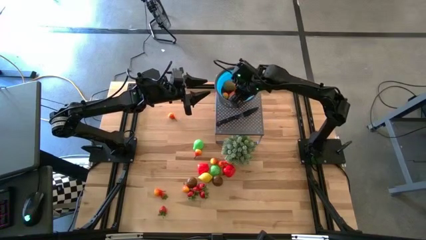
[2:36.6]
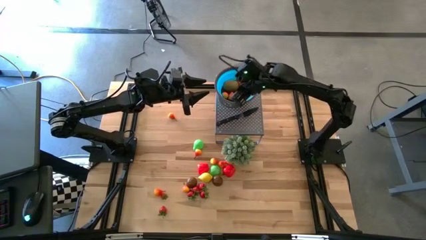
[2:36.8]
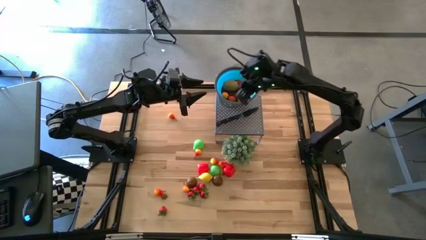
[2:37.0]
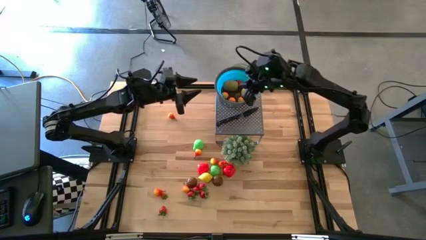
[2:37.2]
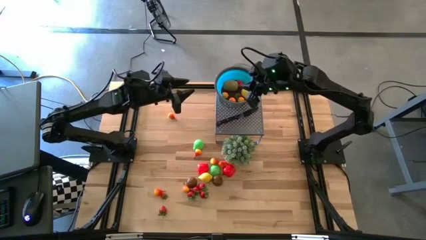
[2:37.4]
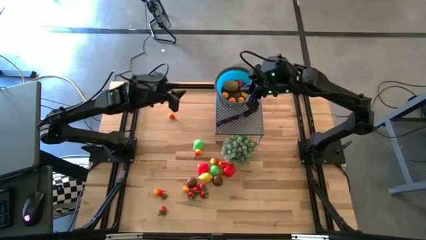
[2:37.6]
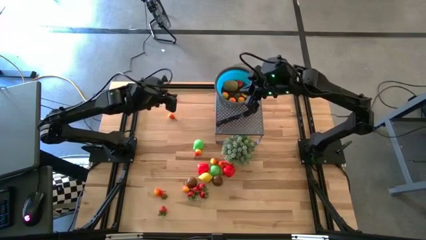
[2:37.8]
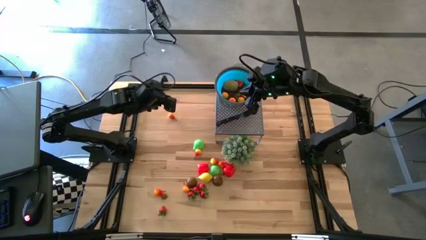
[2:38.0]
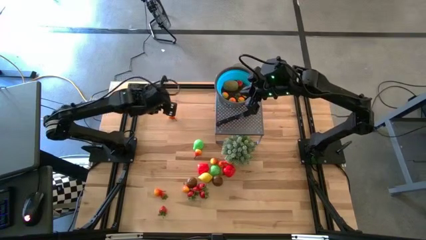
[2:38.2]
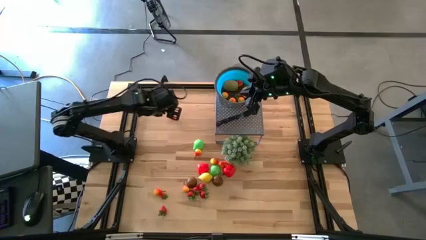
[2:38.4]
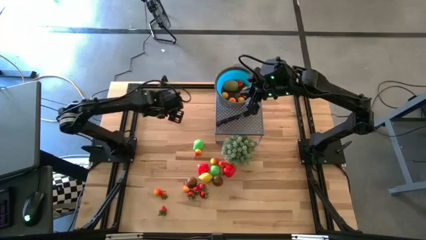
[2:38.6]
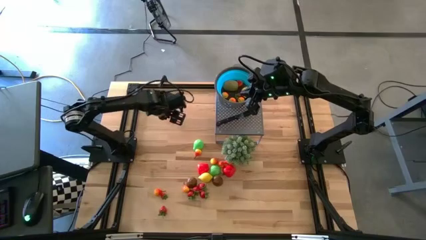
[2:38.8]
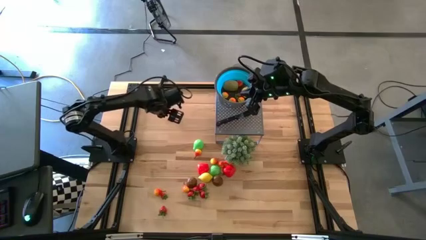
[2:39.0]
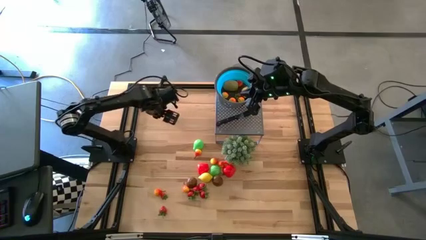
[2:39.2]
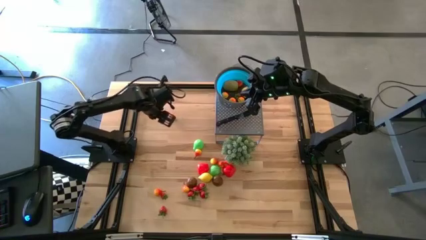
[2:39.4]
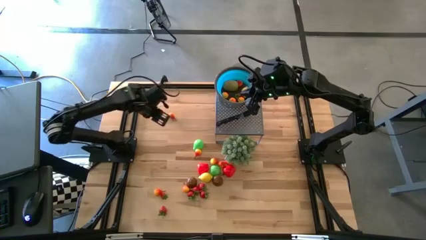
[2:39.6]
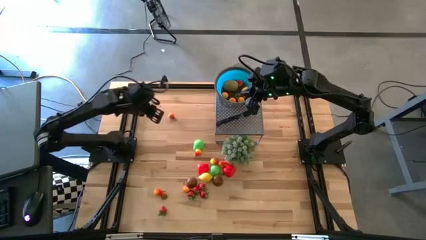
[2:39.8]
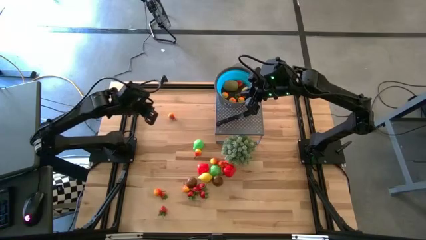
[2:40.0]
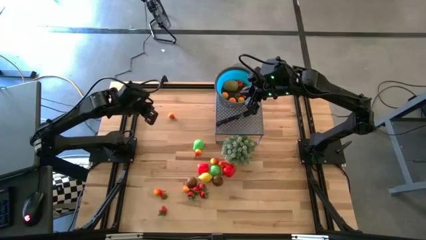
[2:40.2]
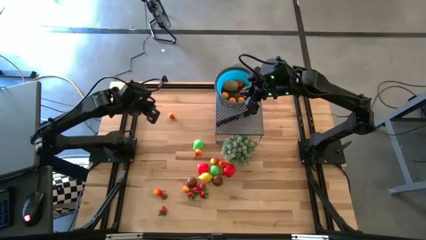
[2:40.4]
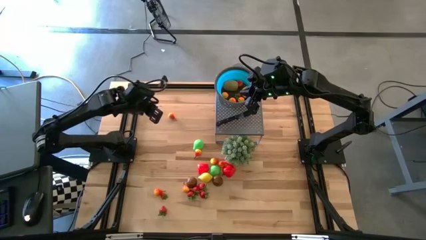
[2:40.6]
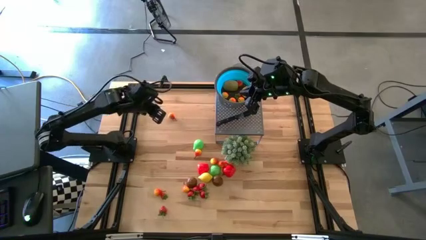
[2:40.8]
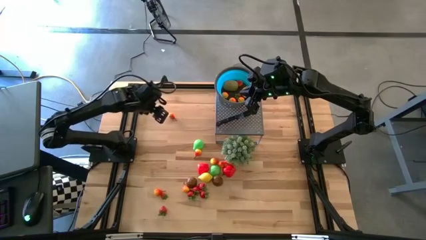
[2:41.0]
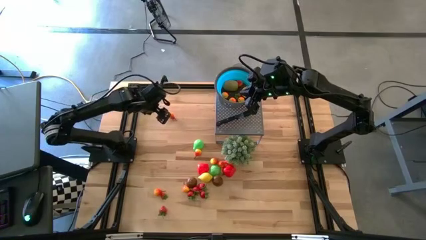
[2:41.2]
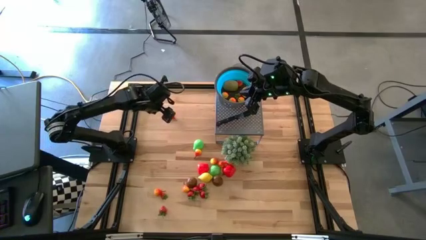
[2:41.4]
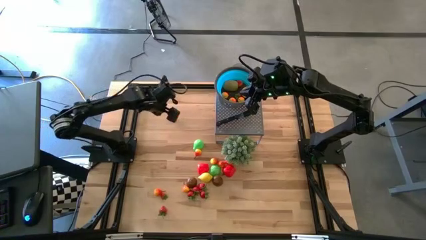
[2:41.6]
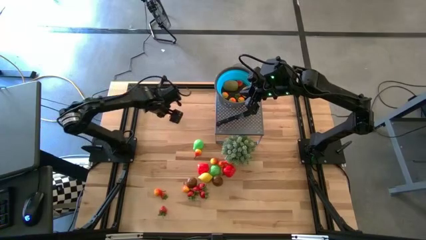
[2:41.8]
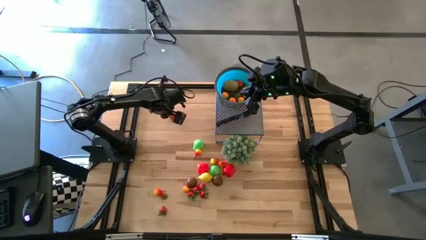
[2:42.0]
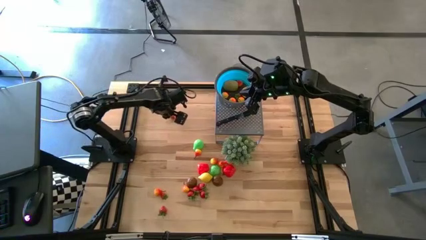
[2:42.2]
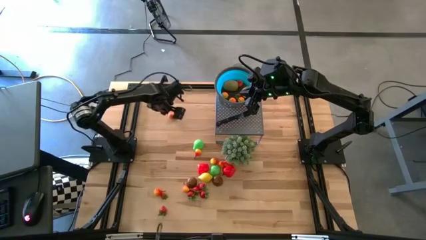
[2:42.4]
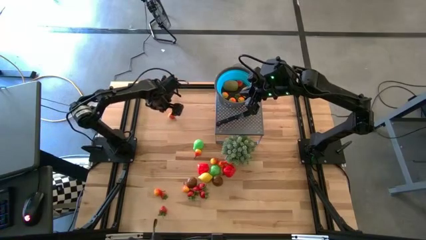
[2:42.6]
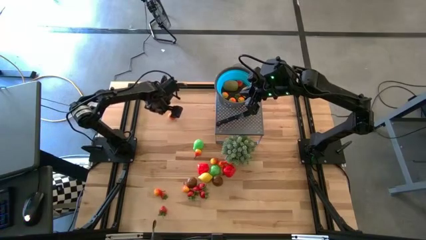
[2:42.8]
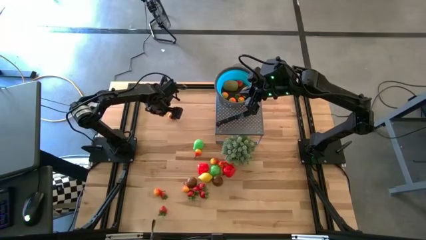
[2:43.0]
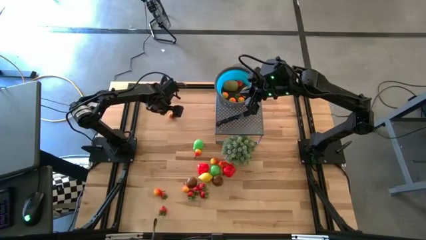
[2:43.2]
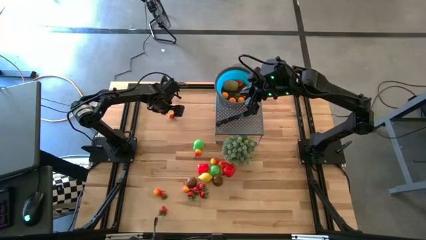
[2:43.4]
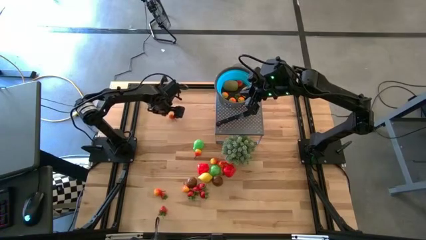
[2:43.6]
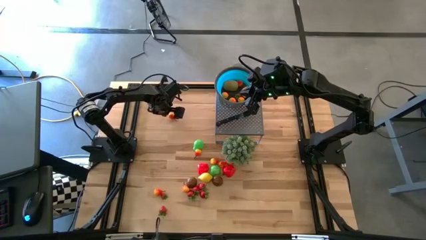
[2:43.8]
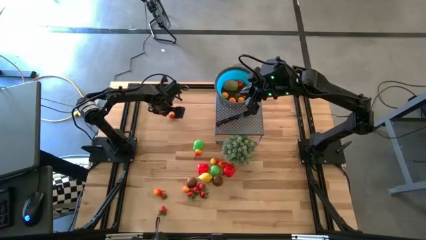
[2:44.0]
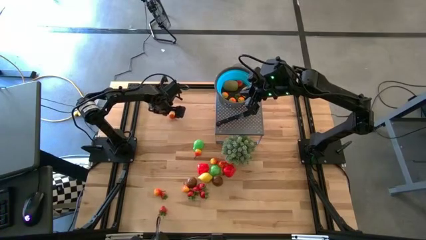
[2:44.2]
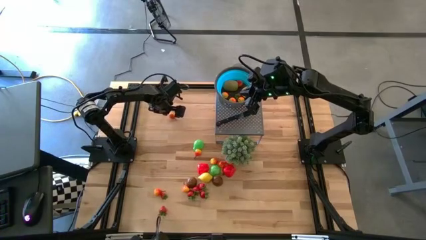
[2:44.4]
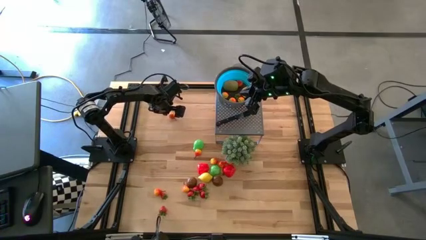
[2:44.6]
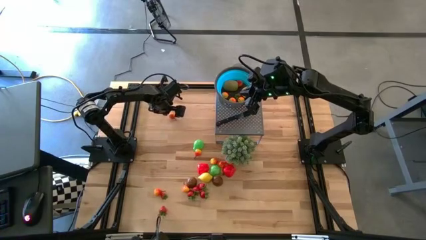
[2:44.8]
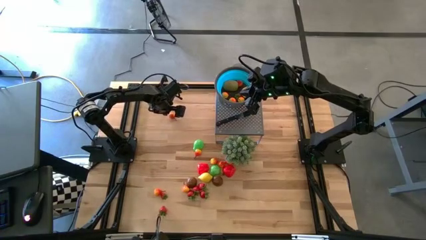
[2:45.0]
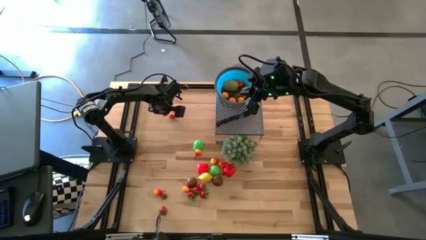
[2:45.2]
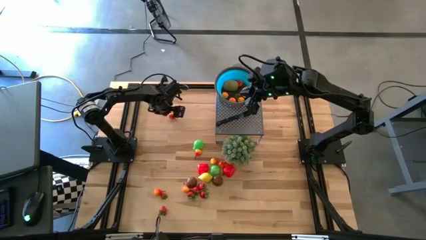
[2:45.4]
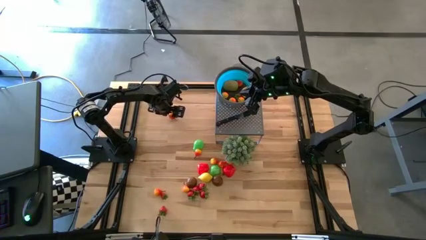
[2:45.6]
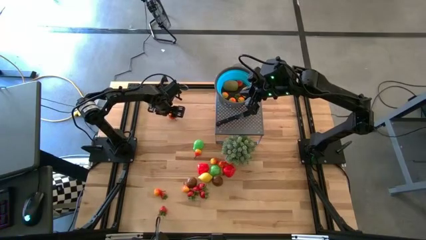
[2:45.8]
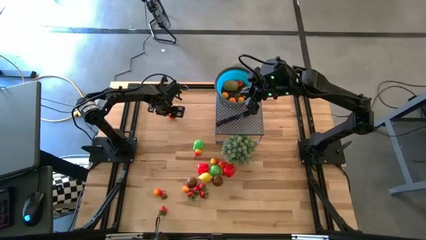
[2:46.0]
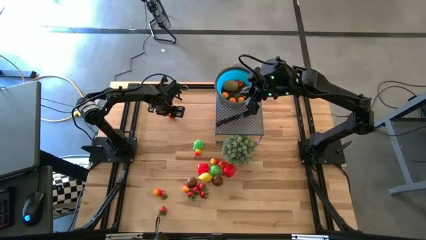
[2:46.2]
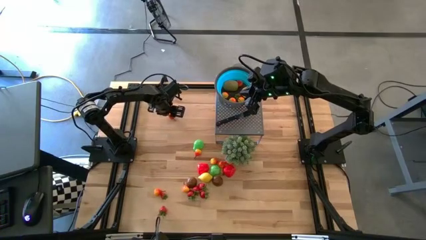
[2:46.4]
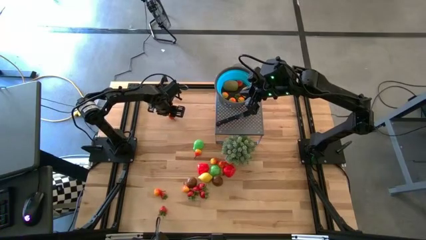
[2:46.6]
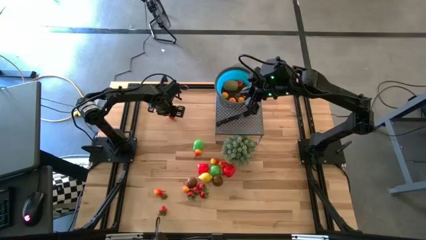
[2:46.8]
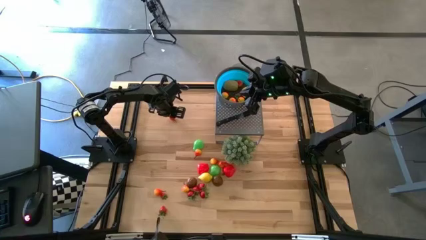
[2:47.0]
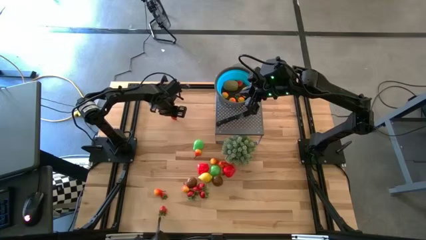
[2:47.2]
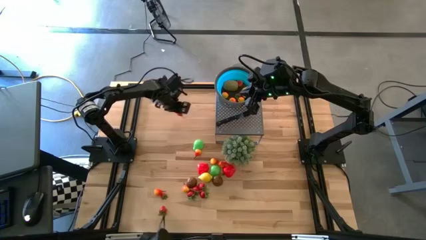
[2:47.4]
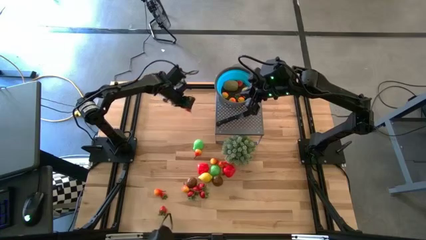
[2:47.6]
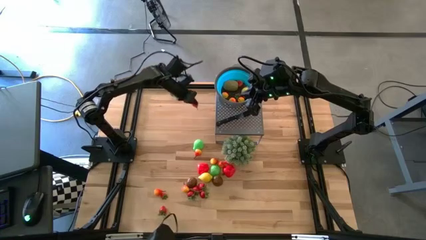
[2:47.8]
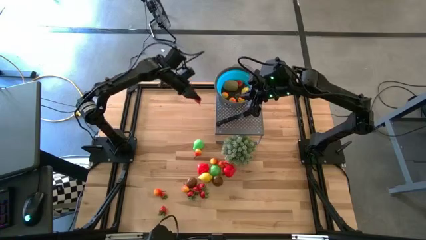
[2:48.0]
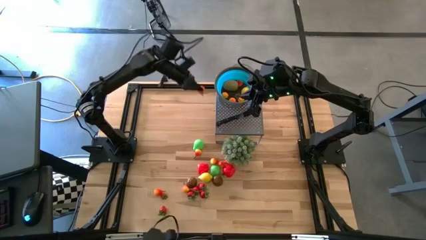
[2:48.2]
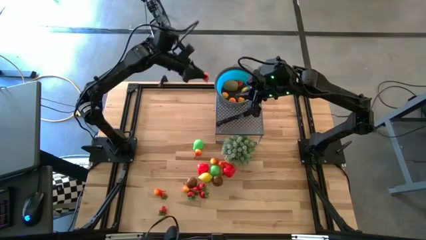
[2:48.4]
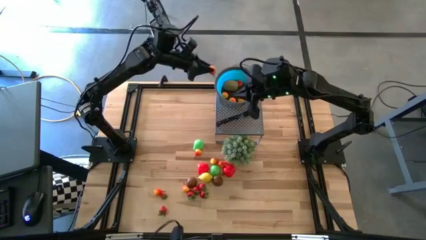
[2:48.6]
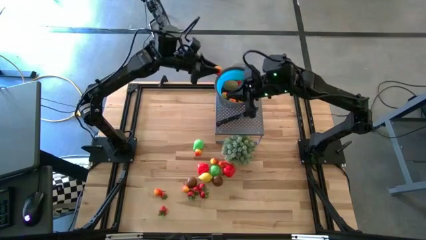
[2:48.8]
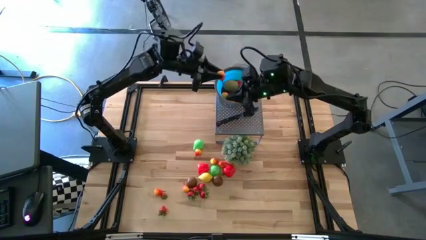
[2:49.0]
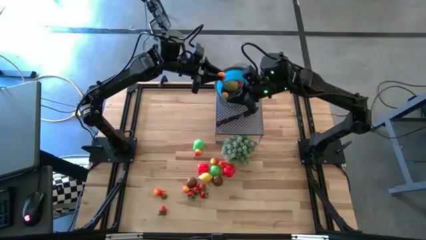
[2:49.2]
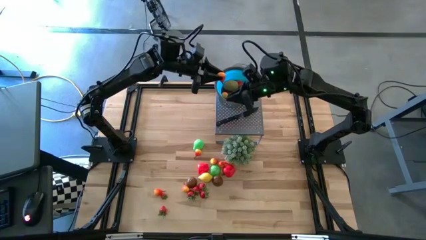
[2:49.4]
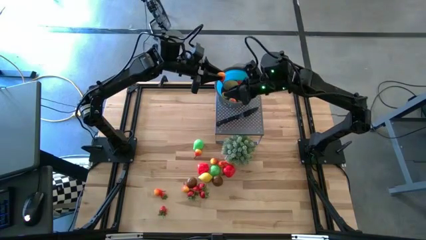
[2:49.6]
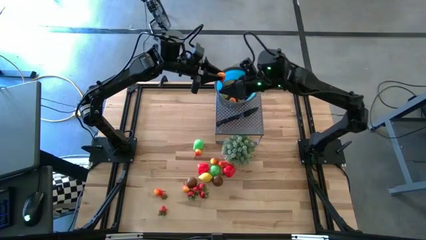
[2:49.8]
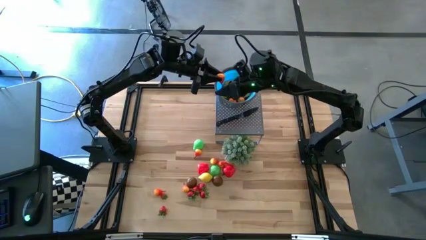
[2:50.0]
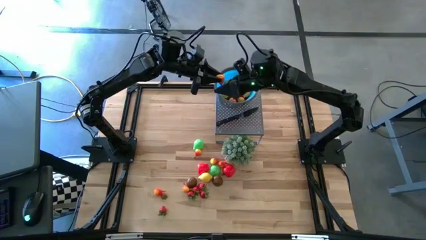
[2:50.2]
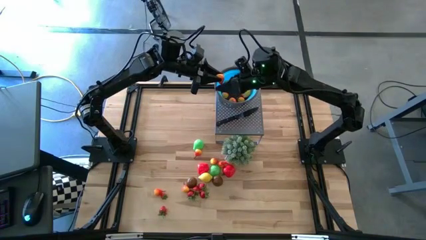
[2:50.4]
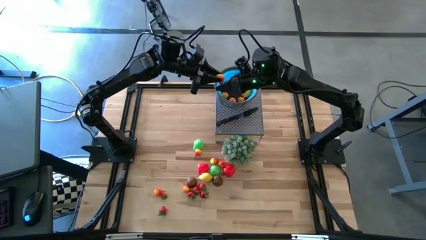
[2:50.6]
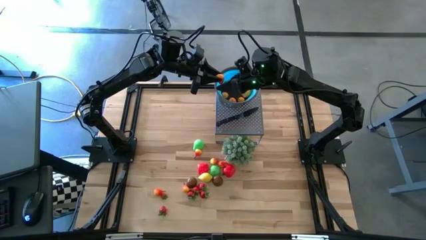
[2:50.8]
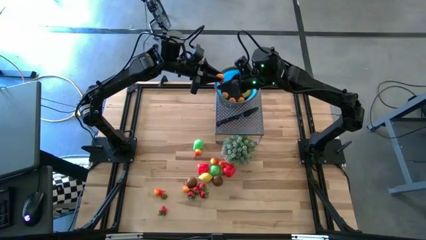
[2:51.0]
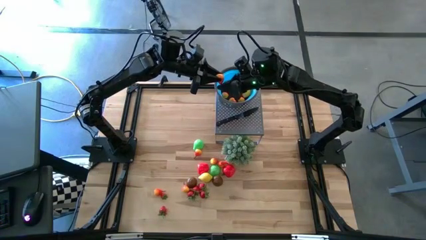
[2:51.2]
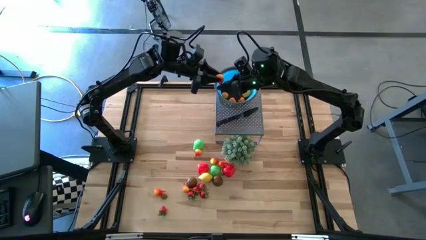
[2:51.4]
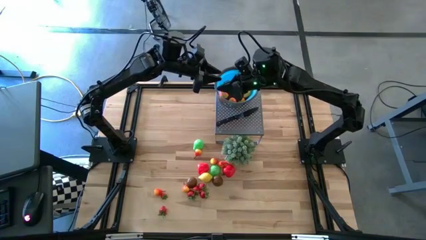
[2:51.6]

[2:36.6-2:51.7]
Task: Pick & Place Fruit
Put the orange pear into the blue strainer bowl

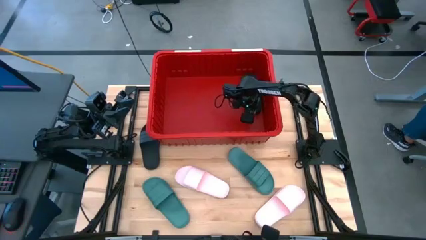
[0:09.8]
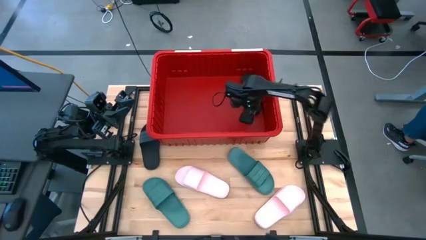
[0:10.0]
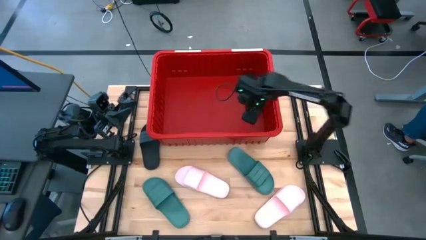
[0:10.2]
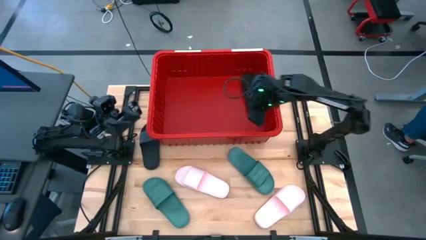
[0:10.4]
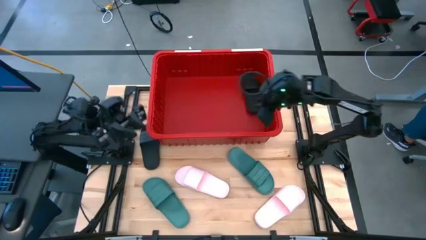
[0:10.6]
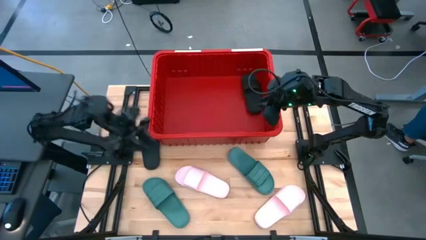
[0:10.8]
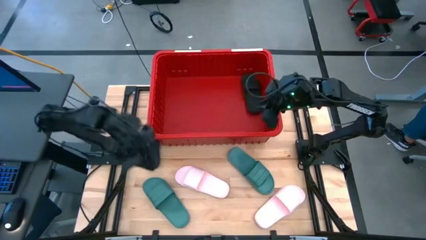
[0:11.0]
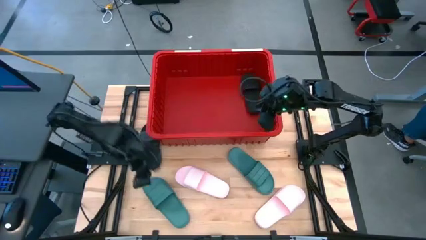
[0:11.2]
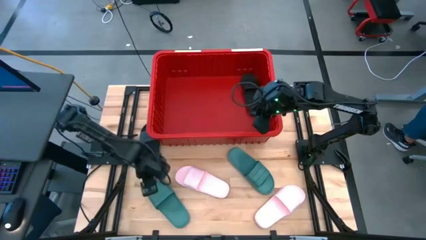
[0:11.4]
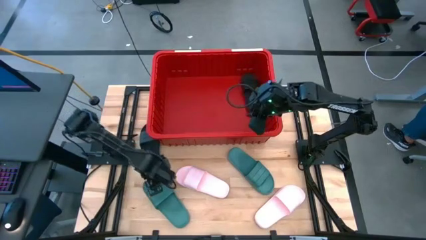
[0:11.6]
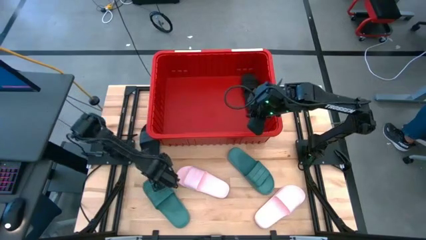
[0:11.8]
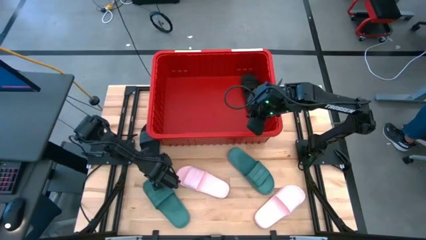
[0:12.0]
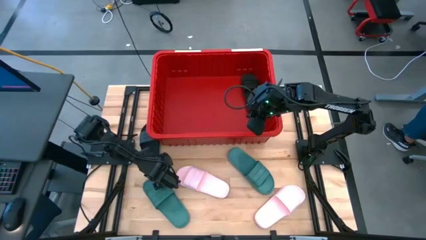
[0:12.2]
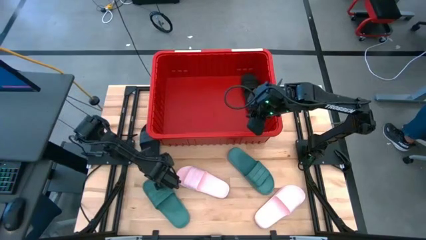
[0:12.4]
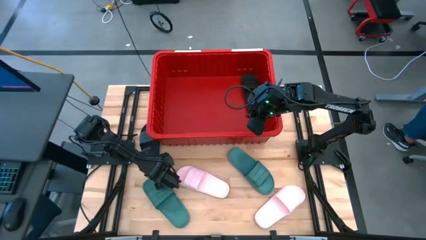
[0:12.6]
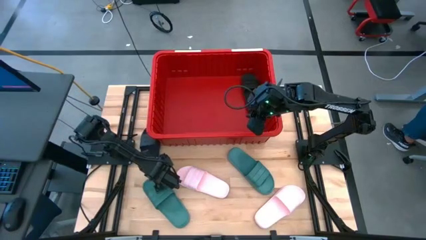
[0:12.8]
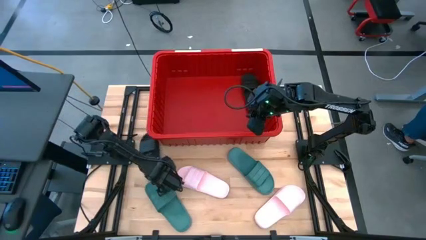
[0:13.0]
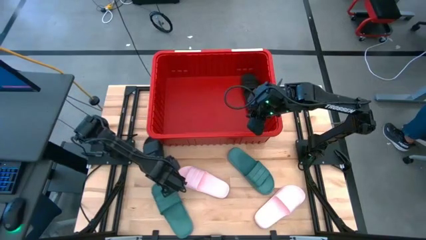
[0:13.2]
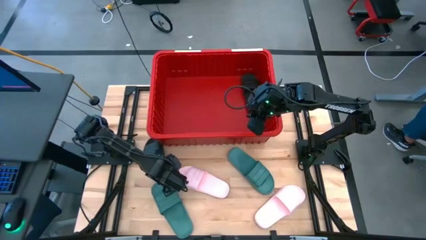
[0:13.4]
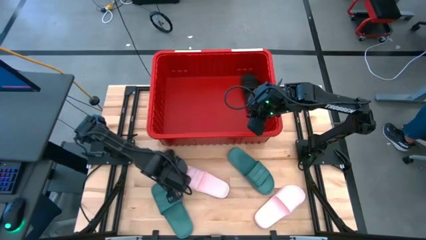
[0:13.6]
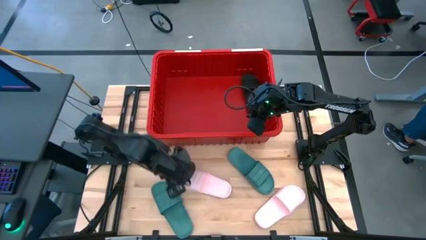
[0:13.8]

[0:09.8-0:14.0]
Task: Pick and place slides into bin
Put the black slide into the container
